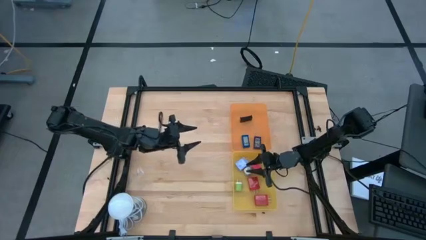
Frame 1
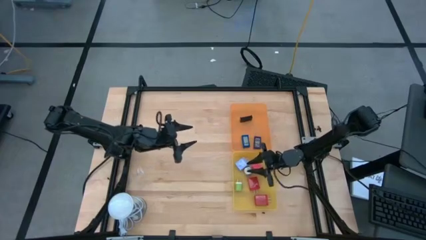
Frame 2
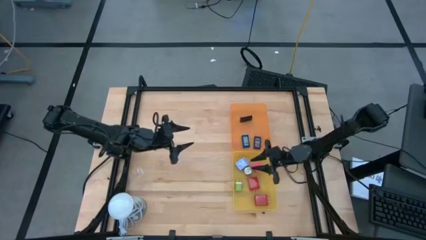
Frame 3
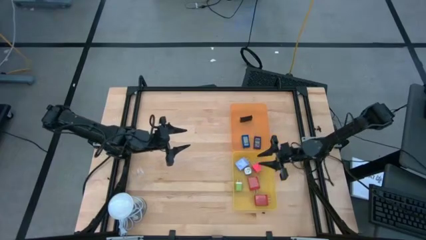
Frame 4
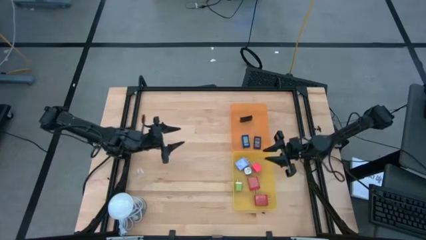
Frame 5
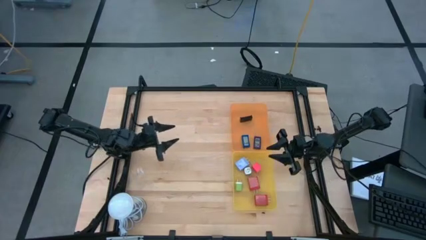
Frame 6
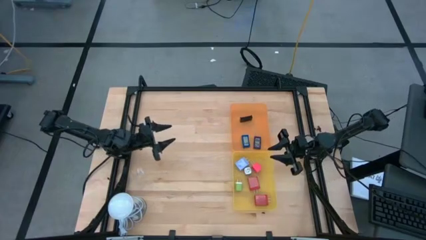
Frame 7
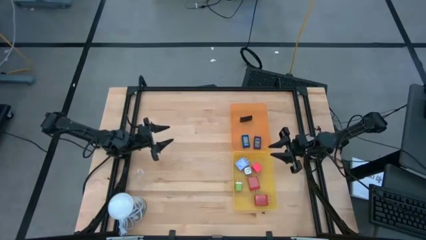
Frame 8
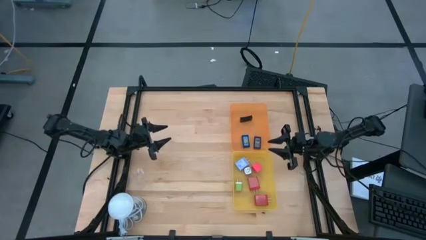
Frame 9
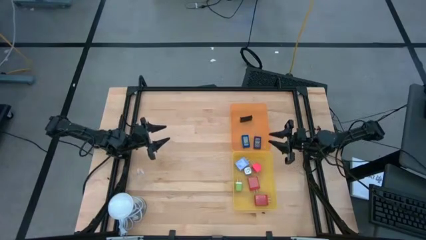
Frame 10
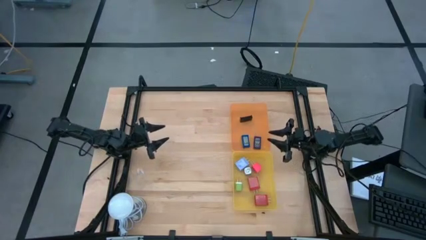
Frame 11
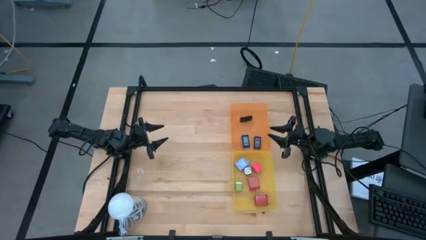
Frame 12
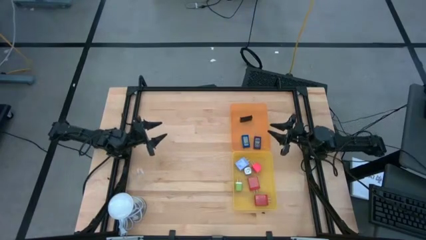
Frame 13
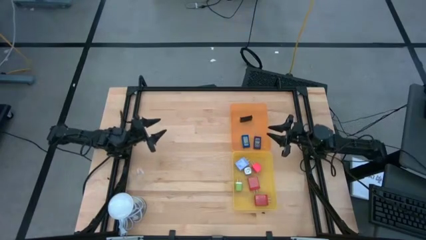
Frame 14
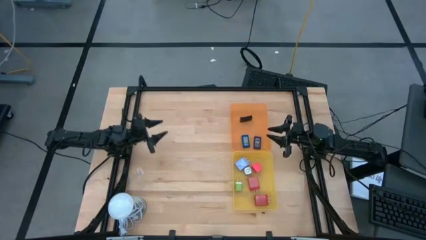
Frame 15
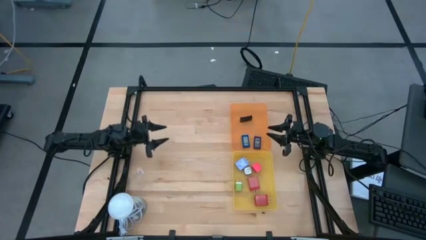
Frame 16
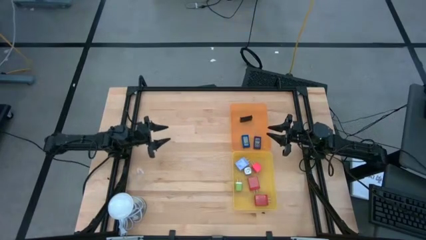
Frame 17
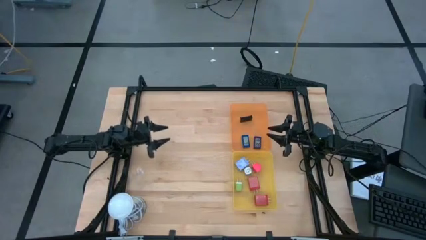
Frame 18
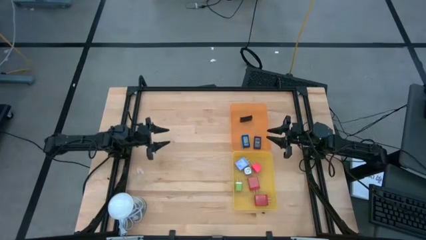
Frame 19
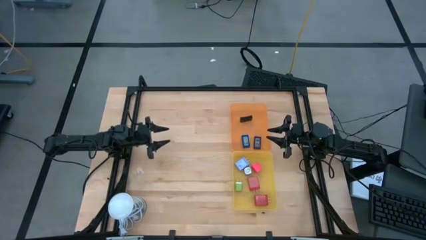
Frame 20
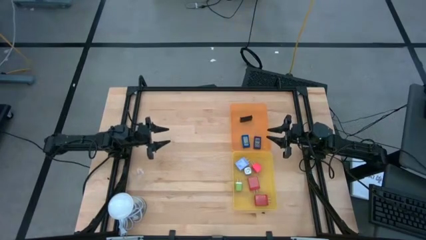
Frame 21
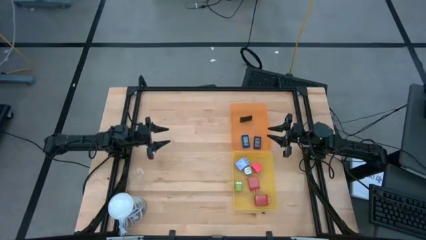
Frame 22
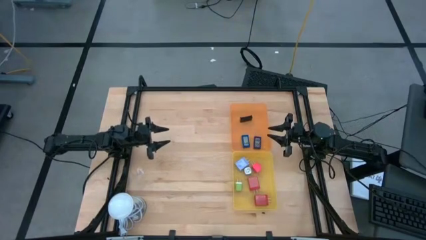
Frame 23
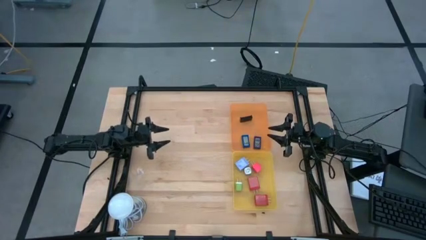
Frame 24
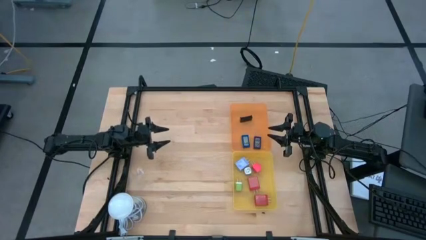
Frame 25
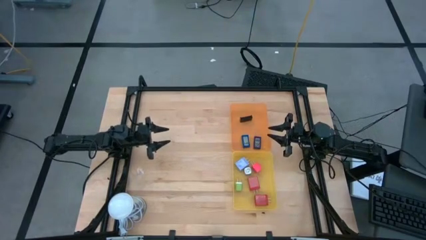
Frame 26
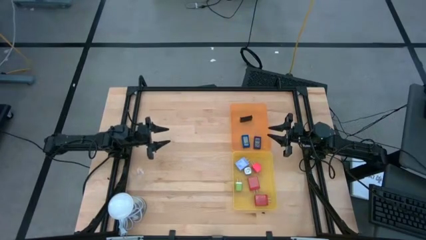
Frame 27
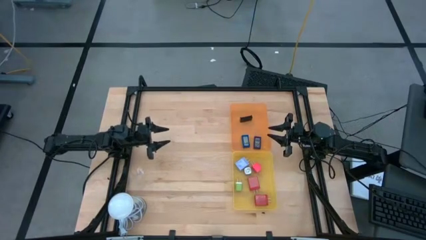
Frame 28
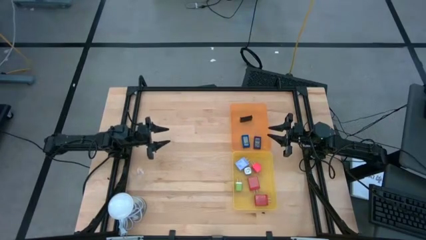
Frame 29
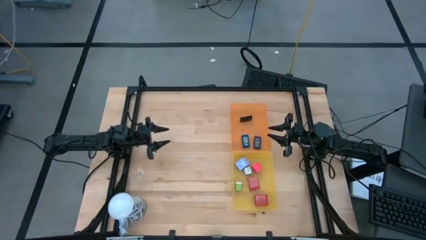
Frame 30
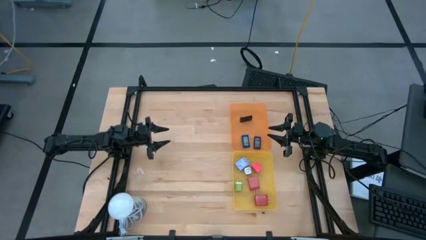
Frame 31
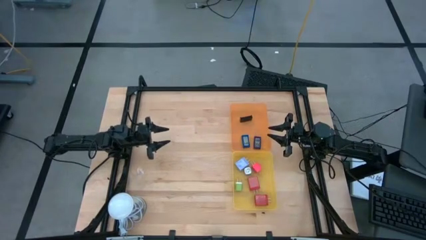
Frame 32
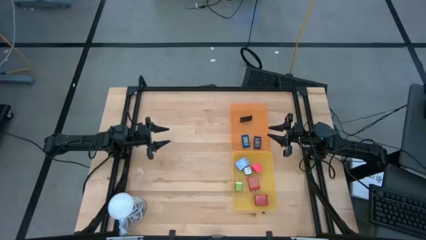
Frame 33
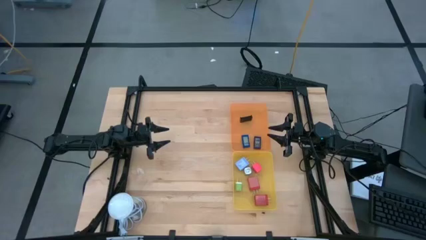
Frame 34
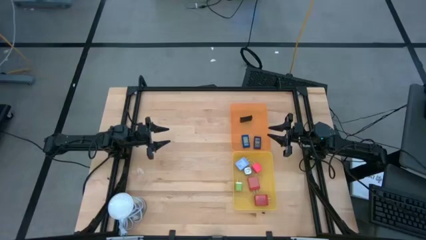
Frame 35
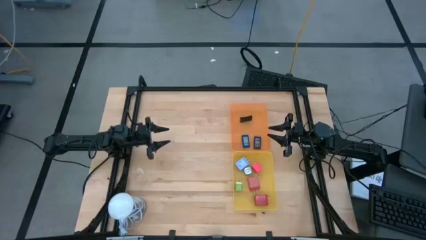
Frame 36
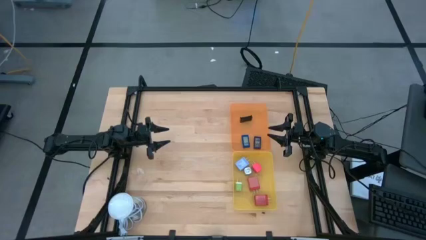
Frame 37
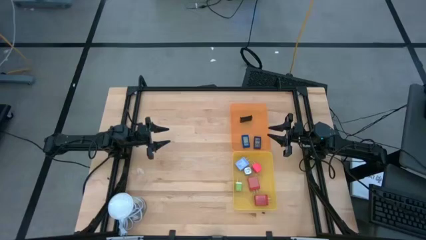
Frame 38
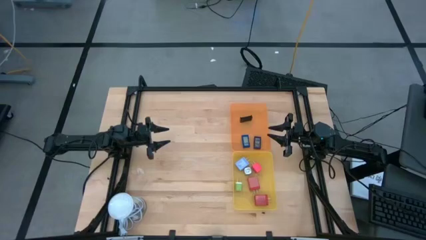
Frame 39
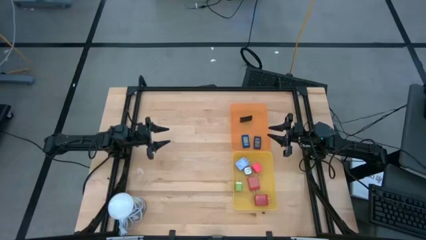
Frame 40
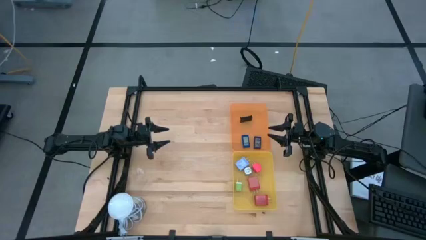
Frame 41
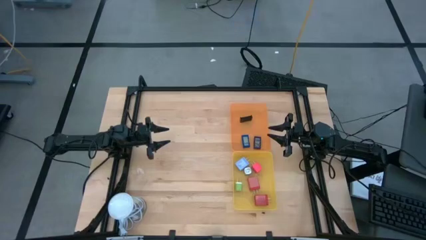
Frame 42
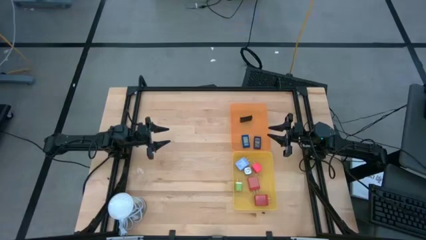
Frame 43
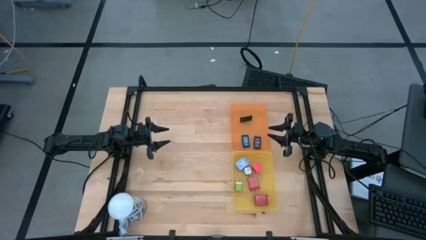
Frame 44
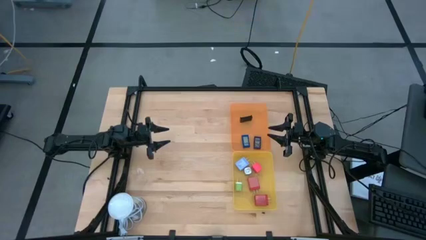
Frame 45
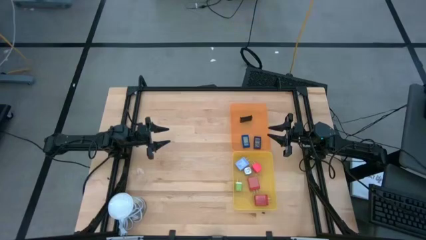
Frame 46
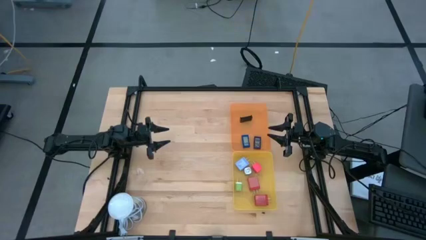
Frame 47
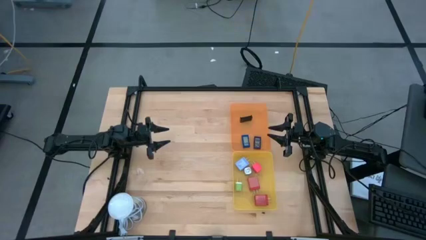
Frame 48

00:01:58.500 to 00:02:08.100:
Task: Pick & Place Office items
Return to Home Position
